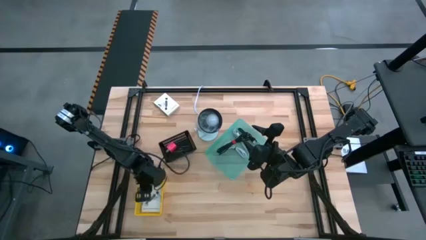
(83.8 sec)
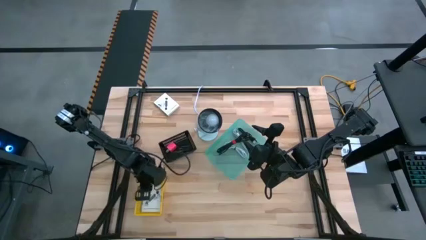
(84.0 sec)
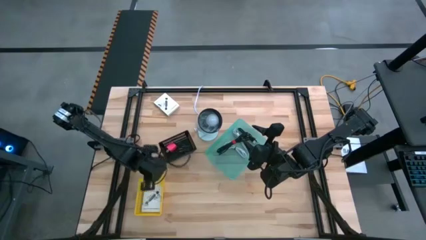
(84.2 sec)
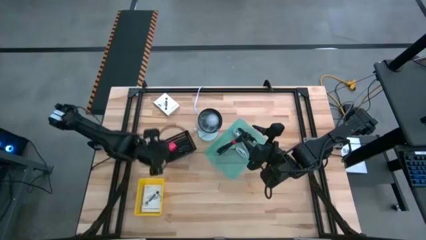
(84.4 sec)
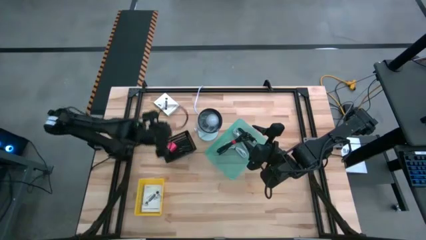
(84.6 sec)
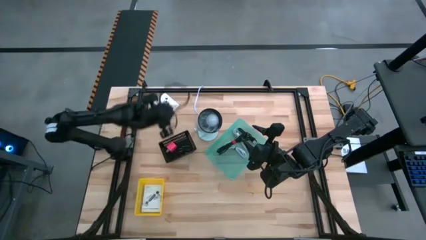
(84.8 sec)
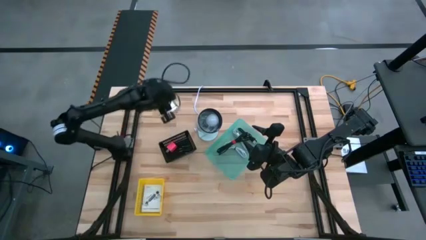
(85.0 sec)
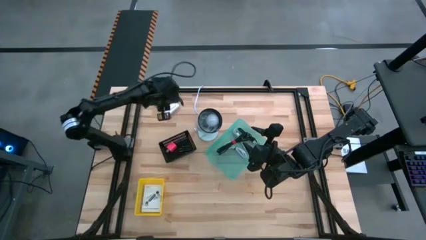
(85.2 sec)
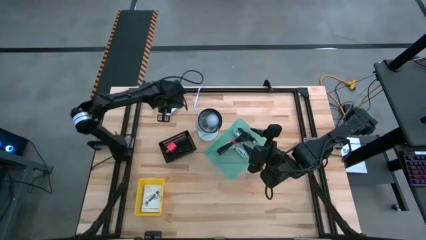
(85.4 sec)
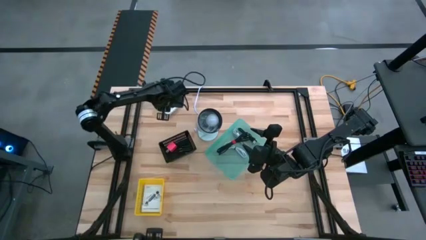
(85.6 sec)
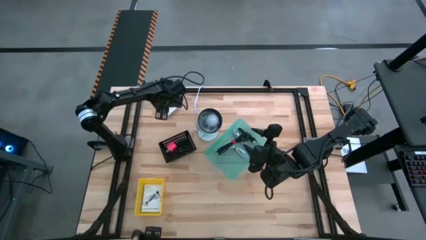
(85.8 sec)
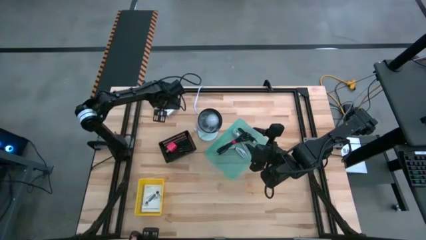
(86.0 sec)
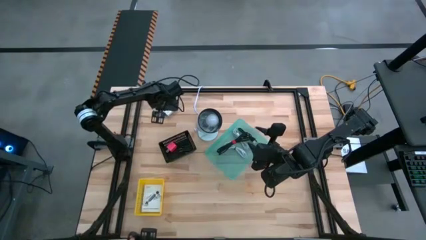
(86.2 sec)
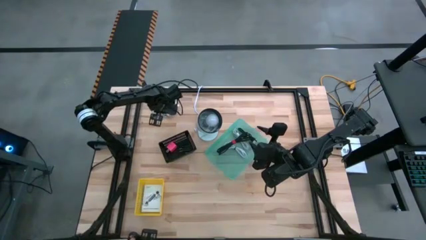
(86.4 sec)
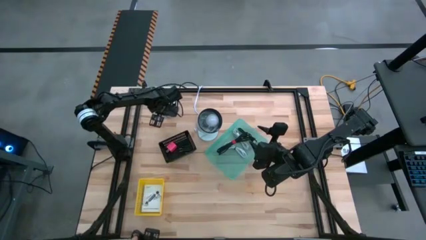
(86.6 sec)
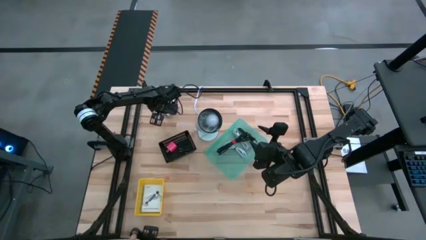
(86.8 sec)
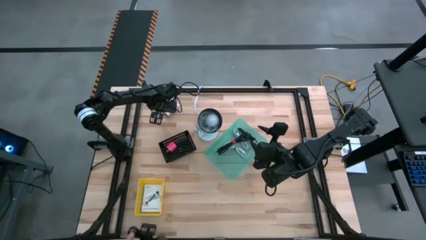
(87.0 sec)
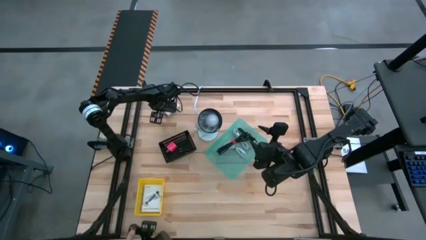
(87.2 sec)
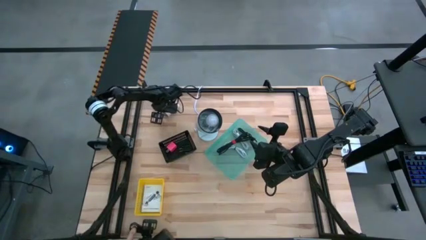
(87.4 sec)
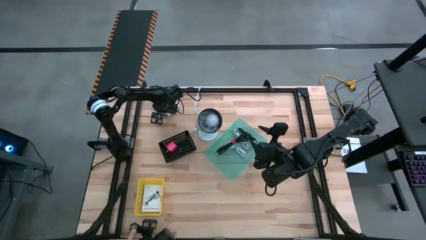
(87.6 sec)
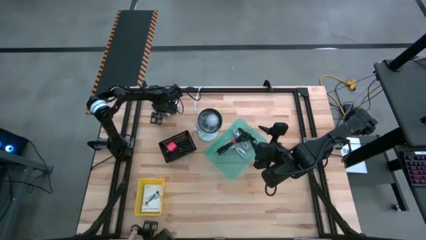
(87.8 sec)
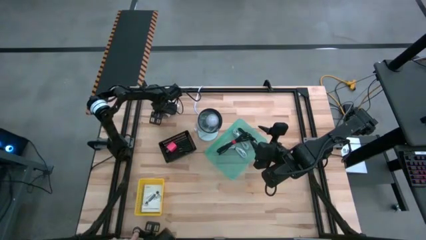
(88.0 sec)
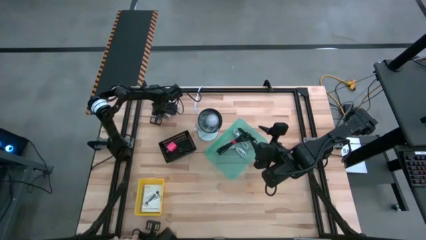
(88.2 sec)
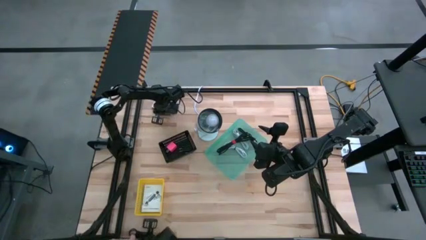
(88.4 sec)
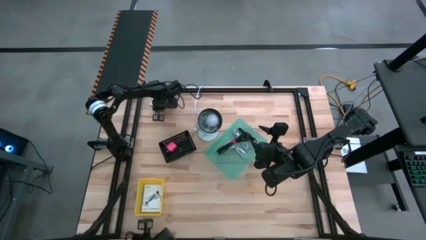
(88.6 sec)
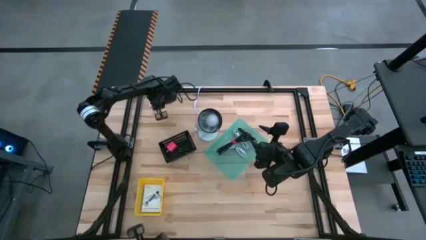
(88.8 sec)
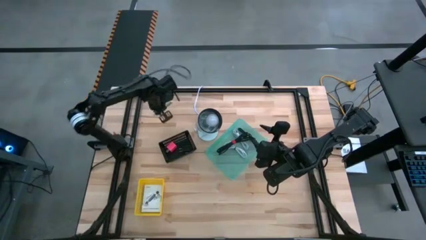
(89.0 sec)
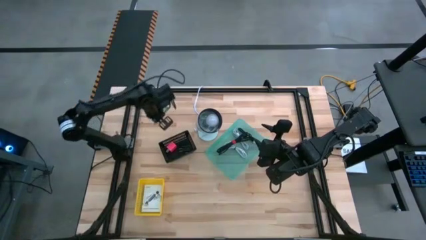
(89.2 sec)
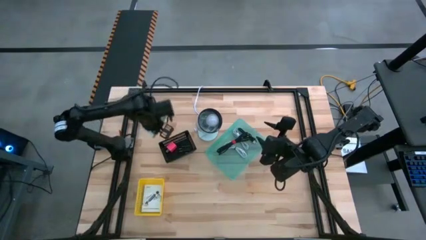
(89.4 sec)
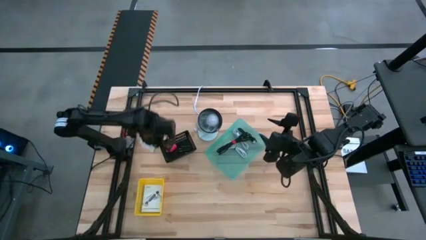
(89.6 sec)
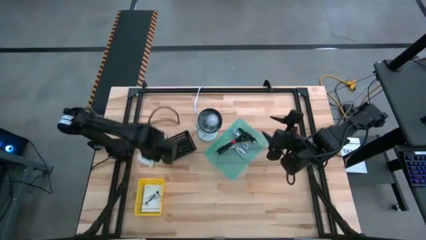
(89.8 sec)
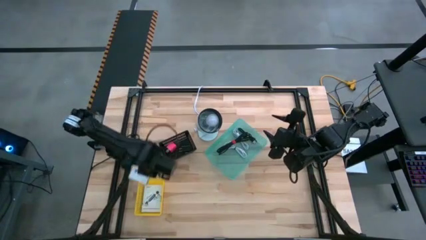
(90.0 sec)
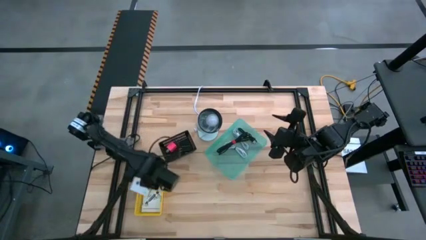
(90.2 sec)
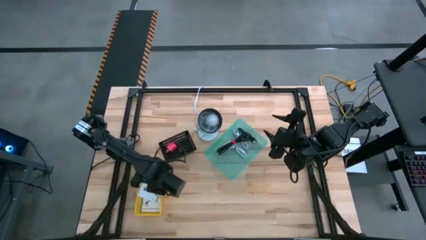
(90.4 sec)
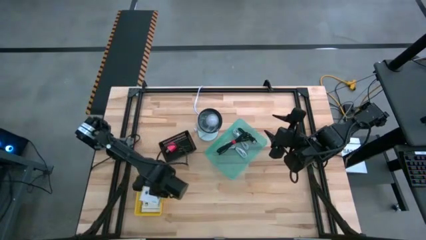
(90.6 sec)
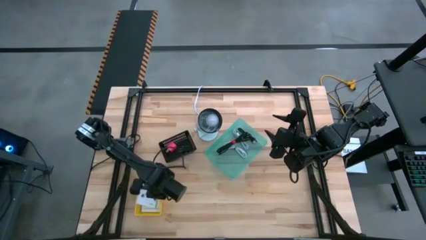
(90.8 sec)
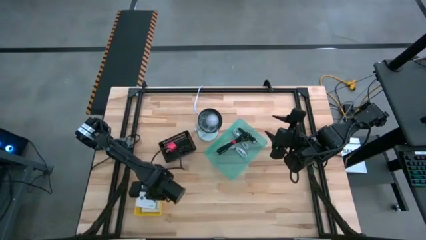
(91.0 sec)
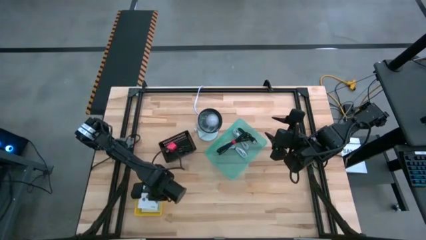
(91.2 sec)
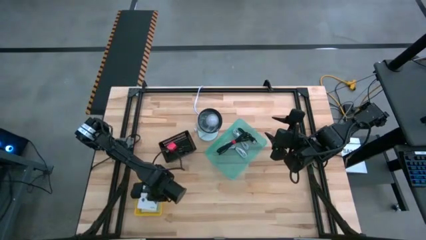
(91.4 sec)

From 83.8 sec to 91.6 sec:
Task: Pick and place items into bin
Put the white card reader box into the yellow bin

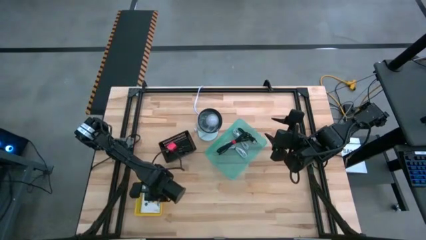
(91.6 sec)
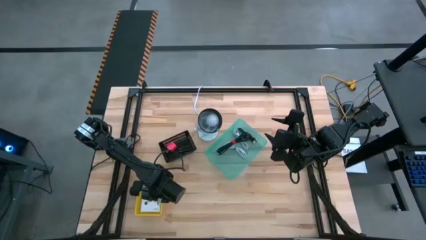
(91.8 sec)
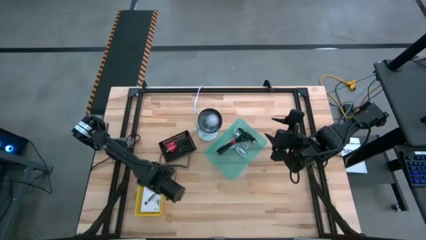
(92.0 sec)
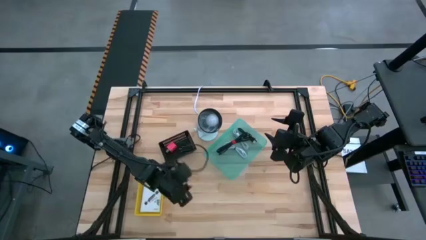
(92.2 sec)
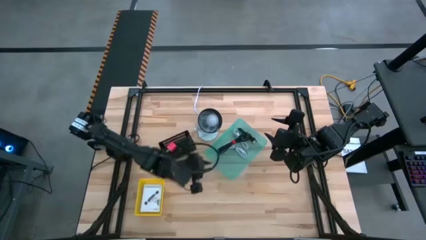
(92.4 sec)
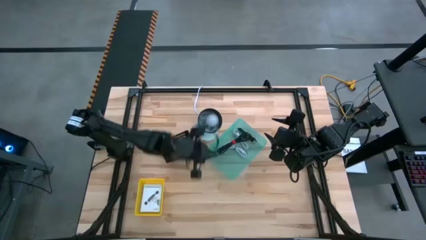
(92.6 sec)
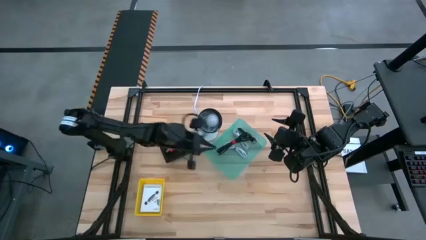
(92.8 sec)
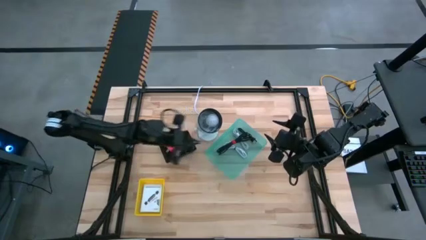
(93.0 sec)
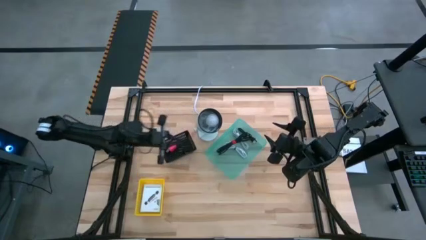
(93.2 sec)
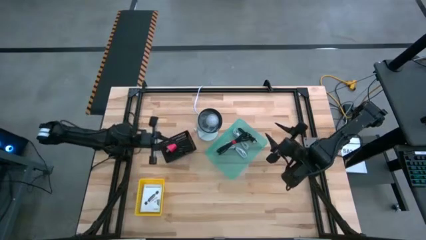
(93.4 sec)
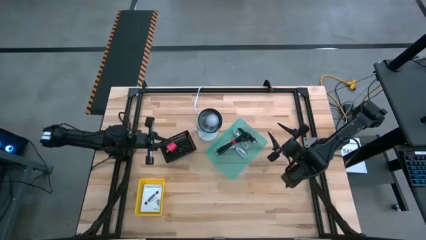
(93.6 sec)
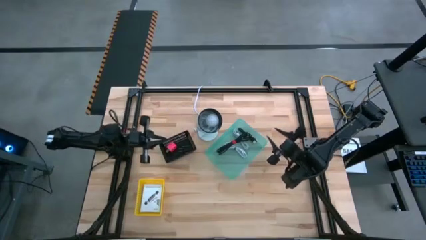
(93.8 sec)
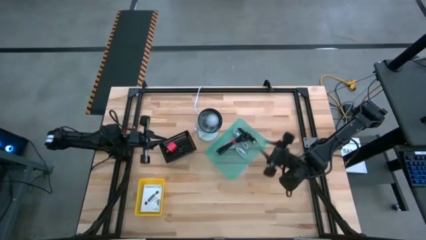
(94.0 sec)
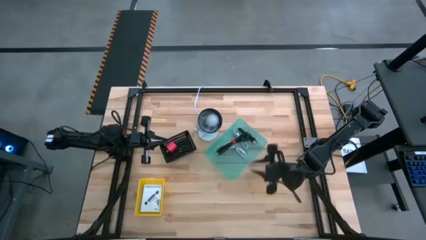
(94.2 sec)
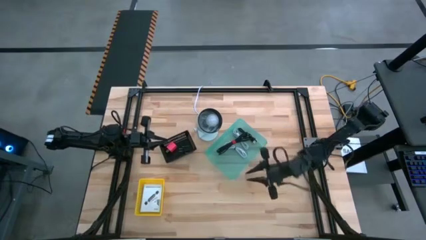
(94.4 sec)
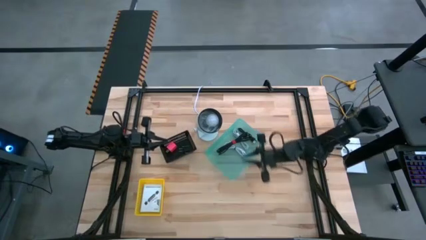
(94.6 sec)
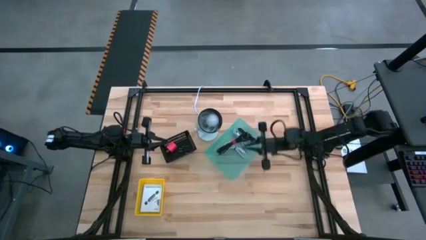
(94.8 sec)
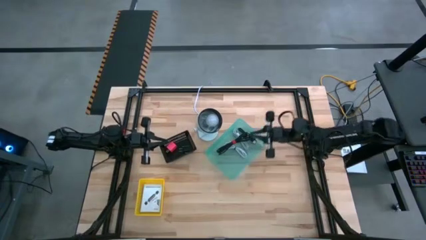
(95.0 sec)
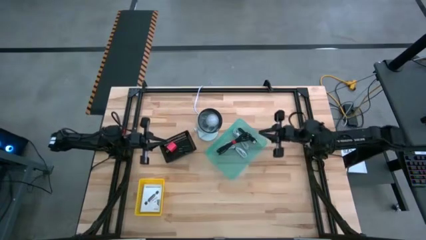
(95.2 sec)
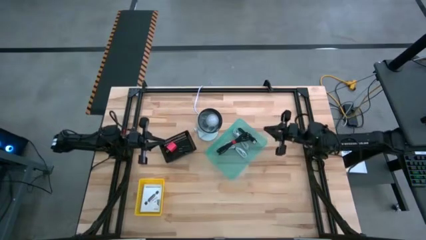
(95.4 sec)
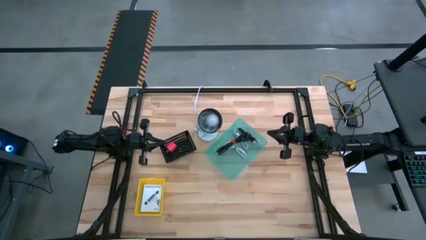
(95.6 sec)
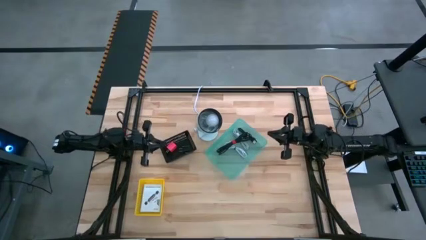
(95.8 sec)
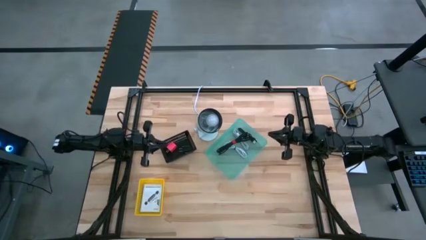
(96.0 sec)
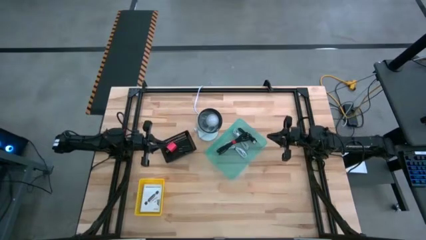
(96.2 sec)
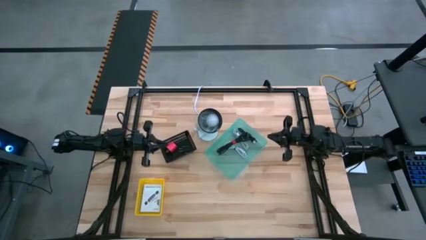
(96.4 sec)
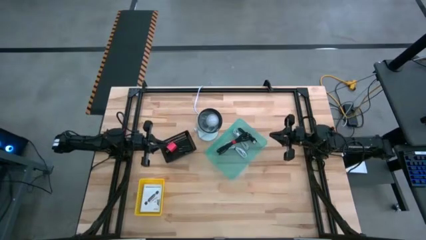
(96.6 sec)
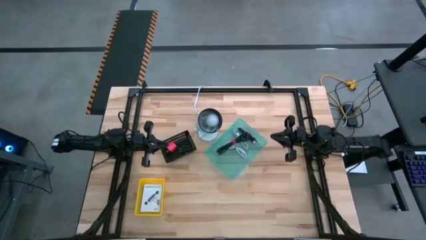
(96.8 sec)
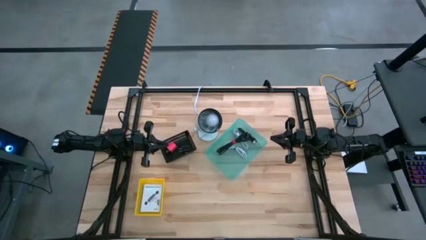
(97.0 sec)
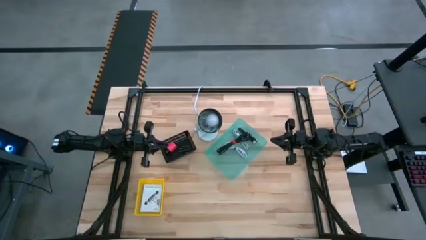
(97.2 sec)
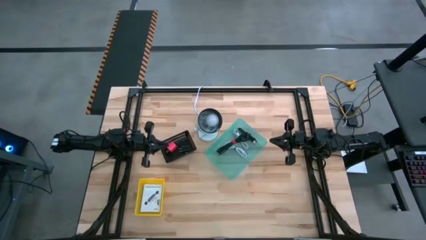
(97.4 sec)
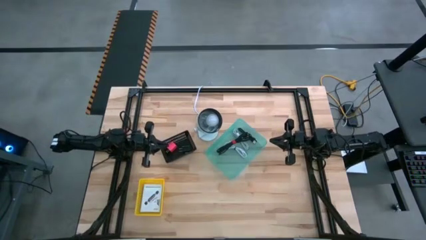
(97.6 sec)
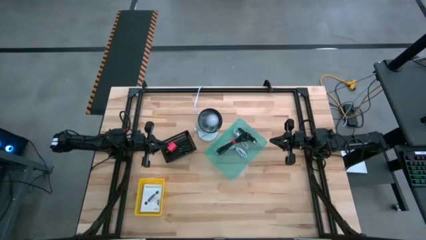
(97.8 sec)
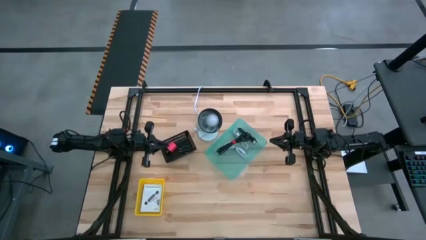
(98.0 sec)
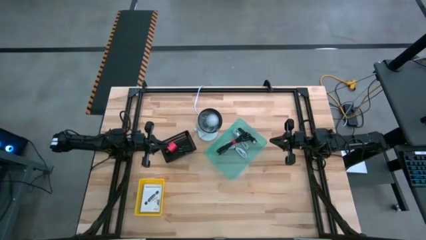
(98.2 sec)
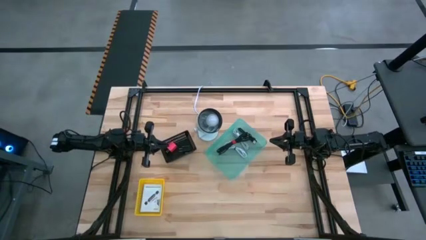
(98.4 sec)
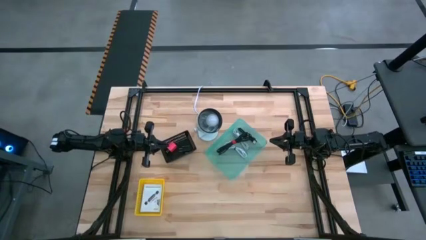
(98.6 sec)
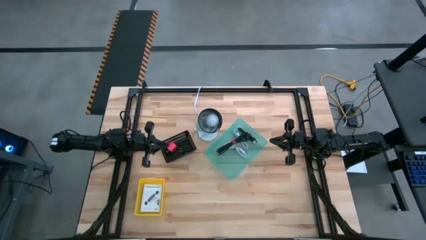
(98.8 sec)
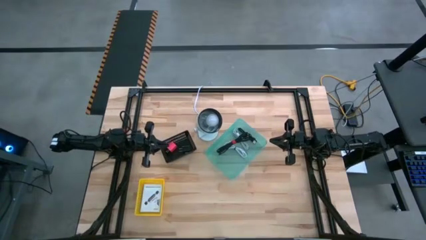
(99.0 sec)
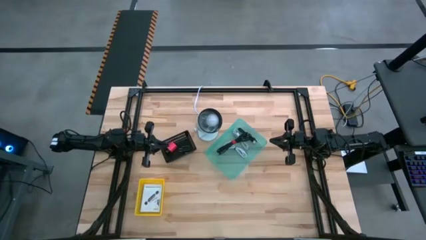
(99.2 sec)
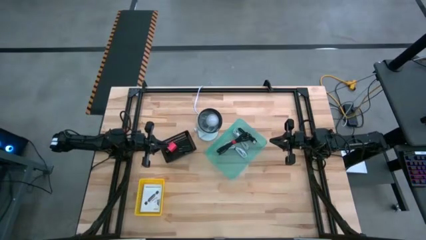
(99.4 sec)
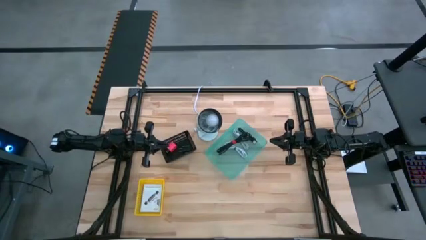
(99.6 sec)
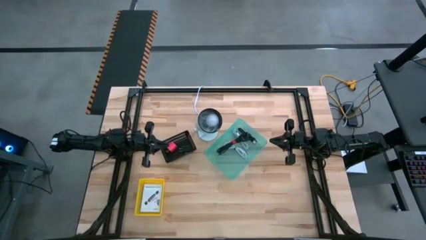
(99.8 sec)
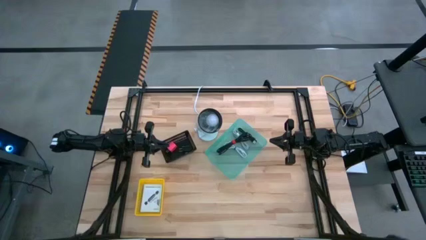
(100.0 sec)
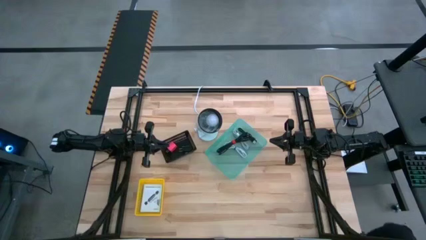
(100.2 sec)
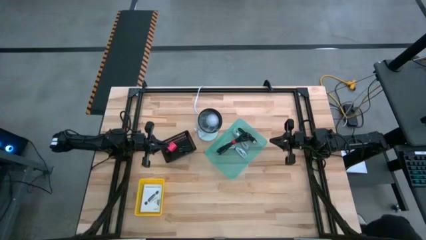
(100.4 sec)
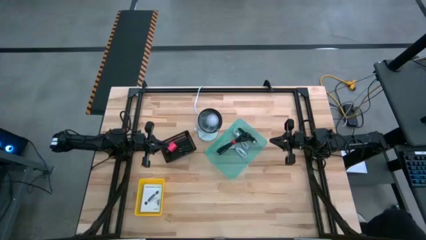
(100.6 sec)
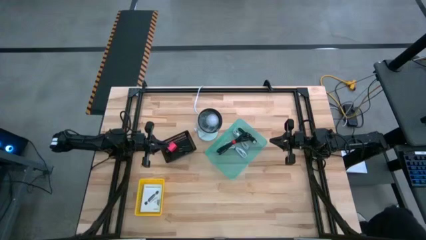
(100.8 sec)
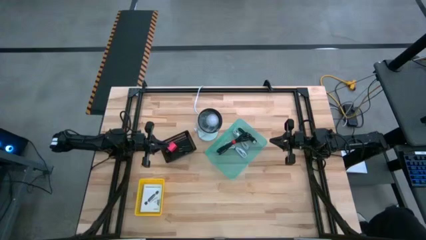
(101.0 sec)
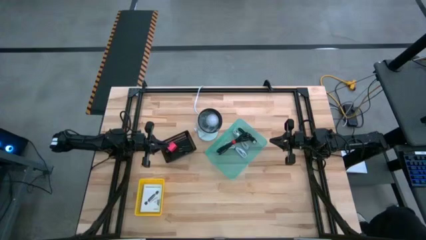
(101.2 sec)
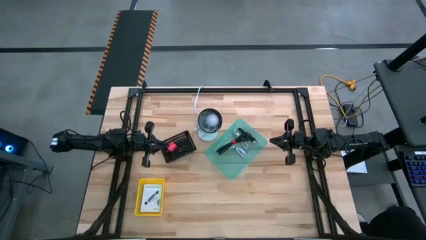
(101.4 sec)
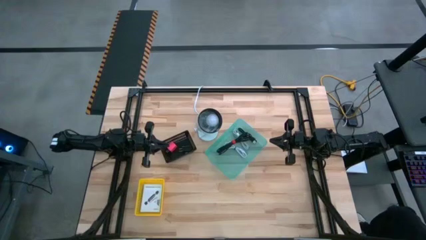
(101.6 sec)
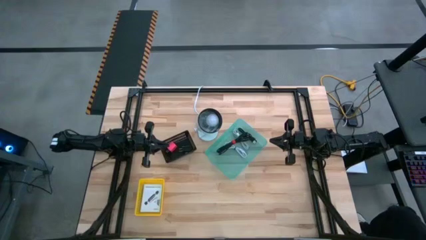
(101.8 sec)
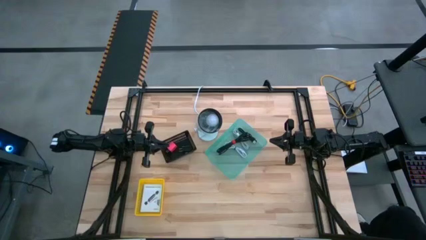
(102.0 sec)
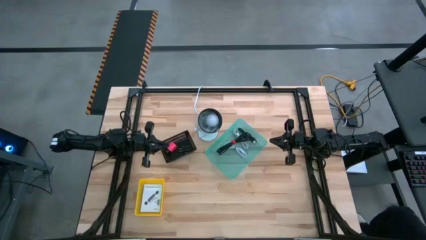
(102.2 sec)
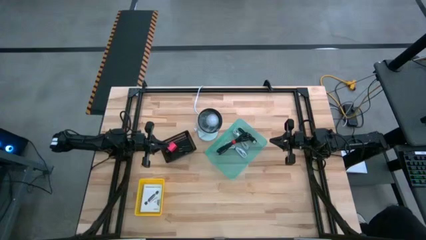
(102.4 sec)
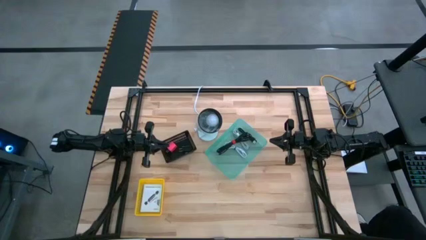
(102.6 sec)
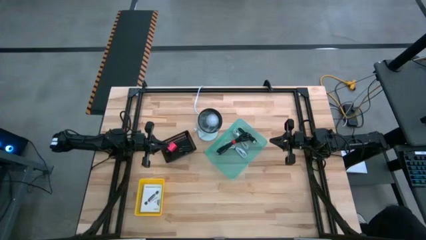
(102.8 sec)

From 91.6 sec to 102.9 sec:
Return to Home Position
